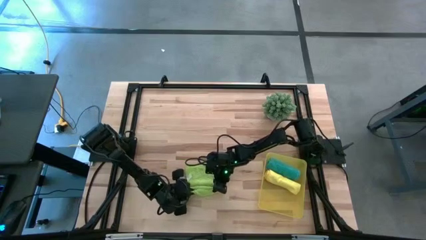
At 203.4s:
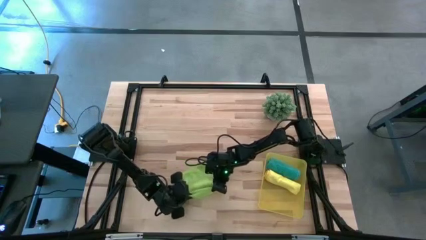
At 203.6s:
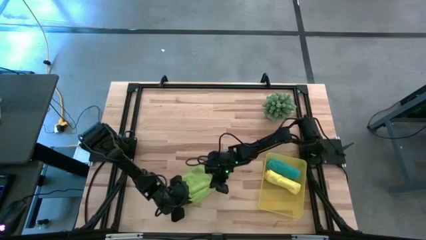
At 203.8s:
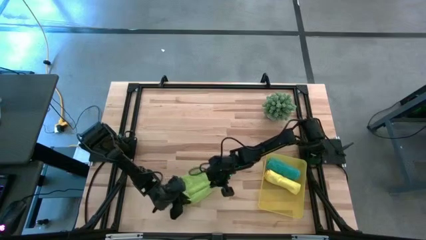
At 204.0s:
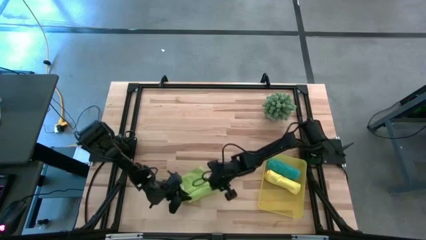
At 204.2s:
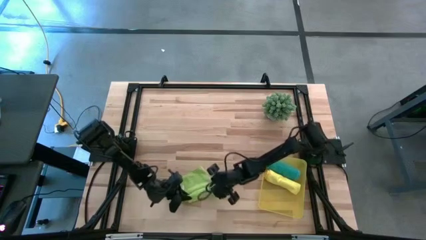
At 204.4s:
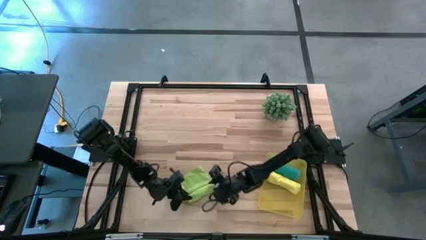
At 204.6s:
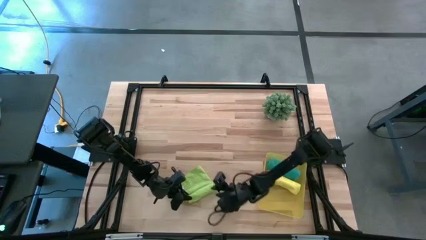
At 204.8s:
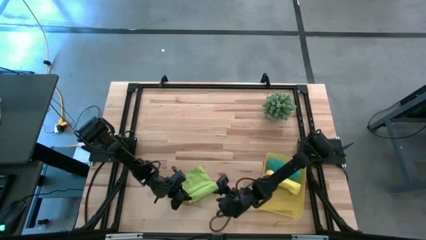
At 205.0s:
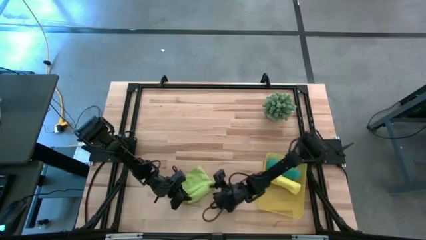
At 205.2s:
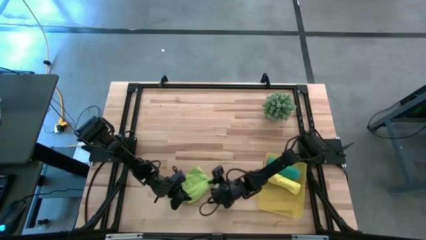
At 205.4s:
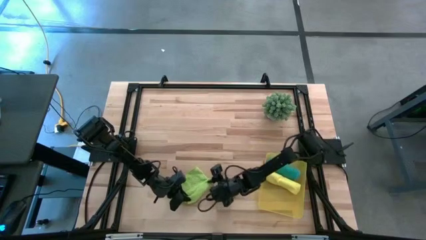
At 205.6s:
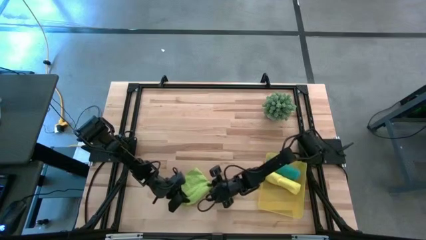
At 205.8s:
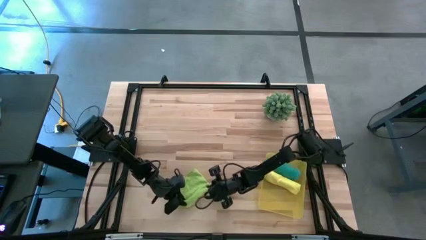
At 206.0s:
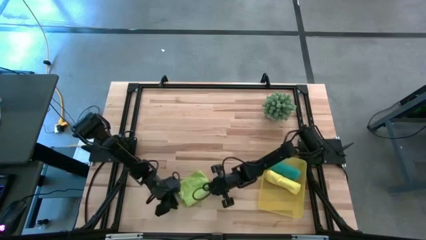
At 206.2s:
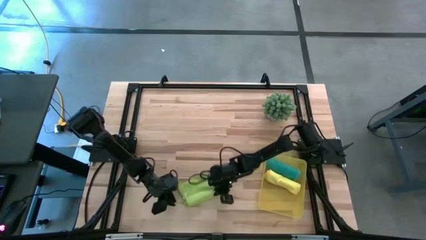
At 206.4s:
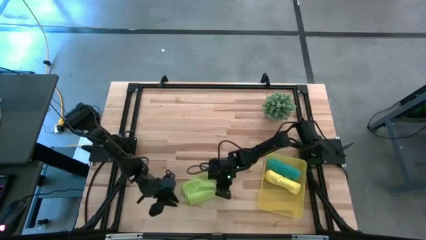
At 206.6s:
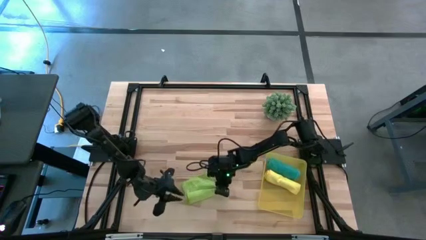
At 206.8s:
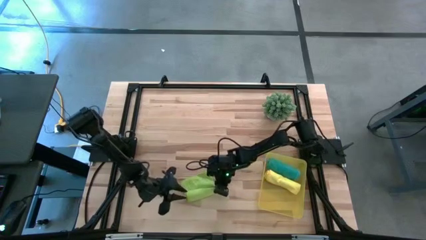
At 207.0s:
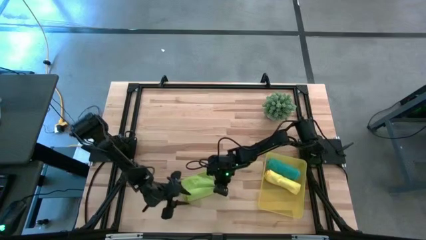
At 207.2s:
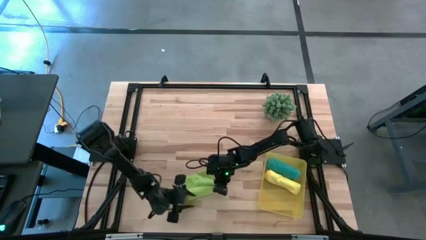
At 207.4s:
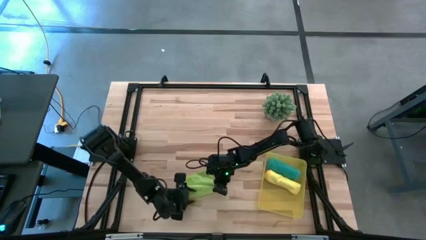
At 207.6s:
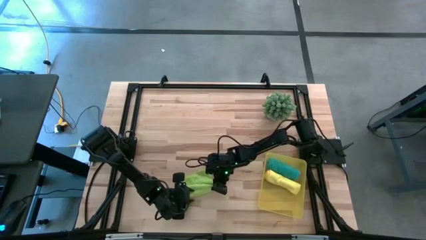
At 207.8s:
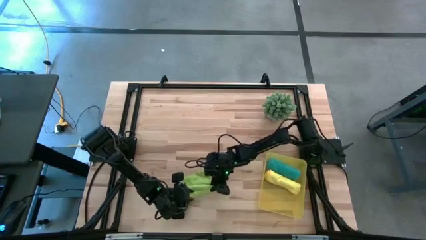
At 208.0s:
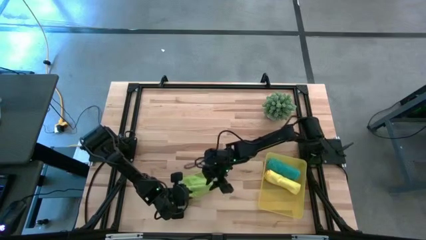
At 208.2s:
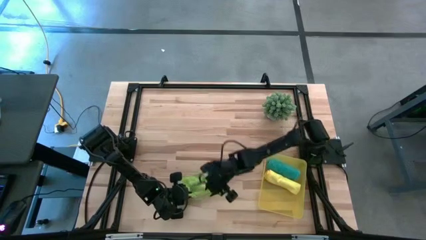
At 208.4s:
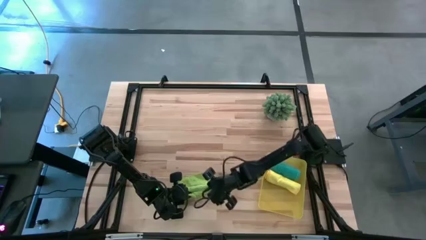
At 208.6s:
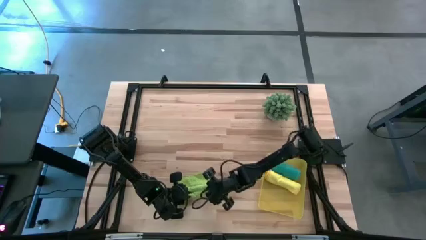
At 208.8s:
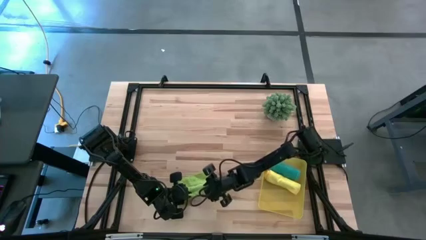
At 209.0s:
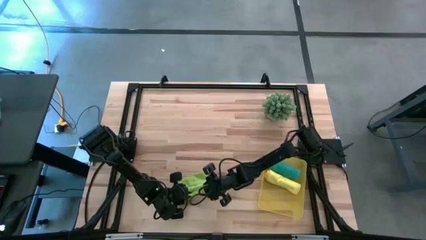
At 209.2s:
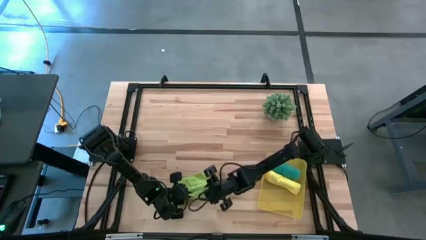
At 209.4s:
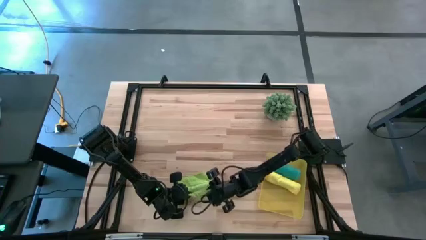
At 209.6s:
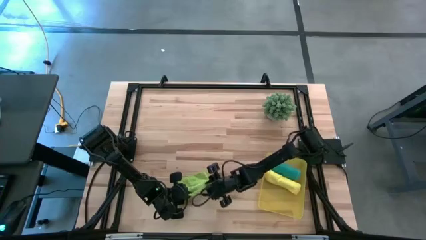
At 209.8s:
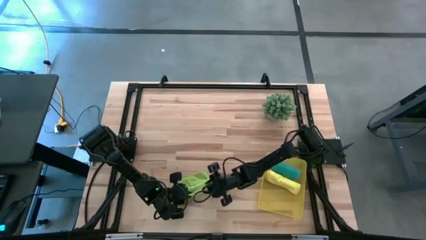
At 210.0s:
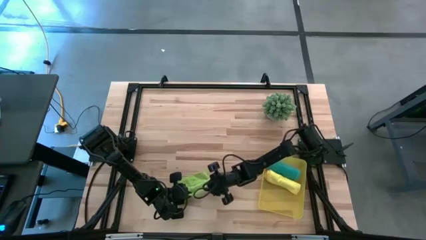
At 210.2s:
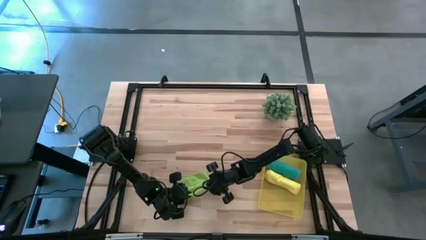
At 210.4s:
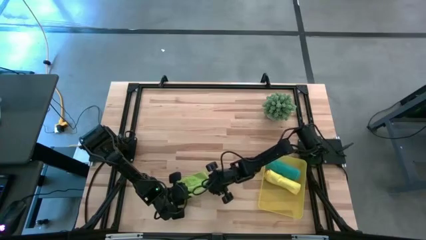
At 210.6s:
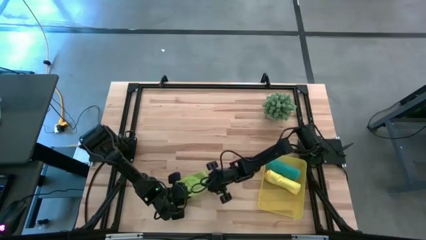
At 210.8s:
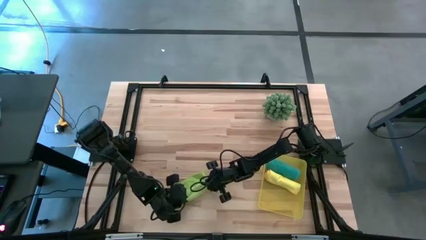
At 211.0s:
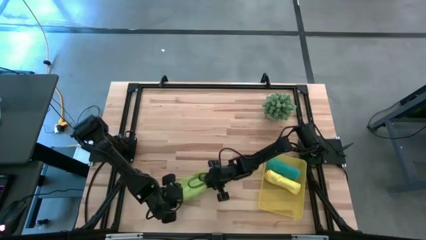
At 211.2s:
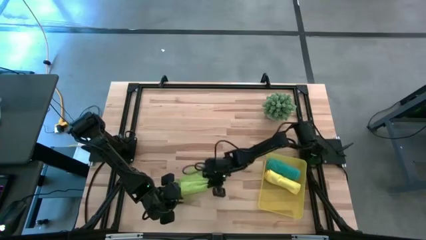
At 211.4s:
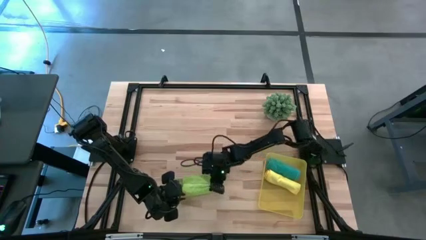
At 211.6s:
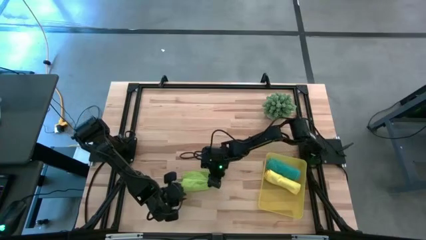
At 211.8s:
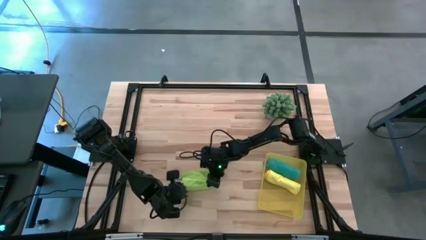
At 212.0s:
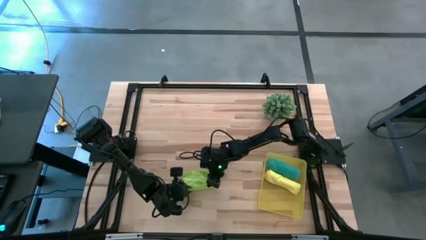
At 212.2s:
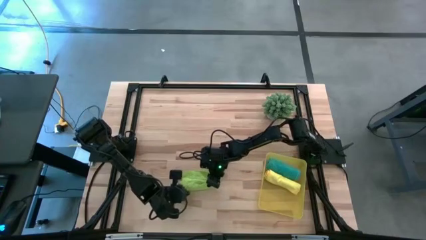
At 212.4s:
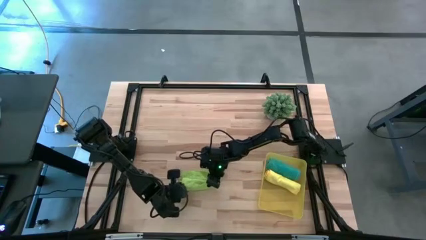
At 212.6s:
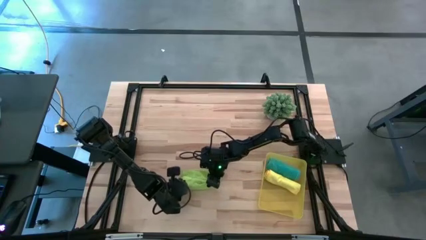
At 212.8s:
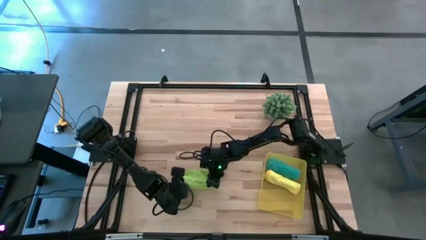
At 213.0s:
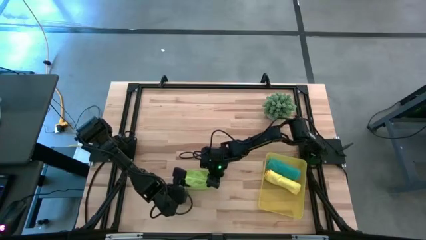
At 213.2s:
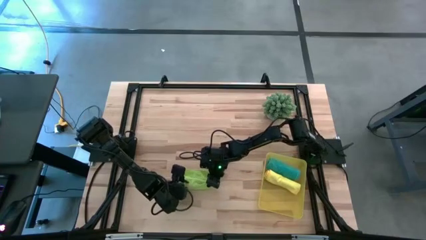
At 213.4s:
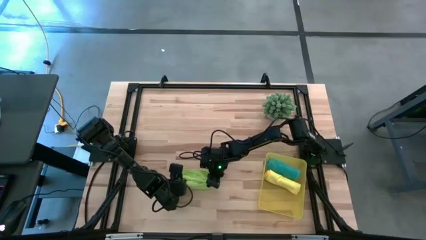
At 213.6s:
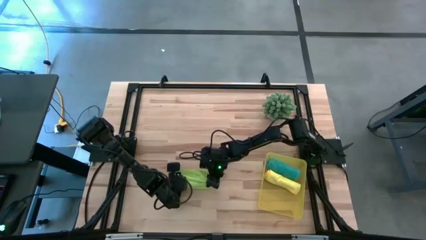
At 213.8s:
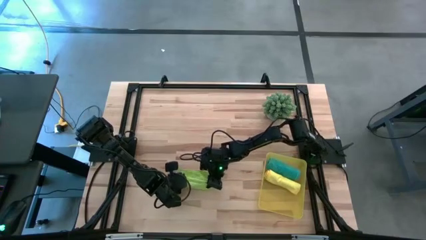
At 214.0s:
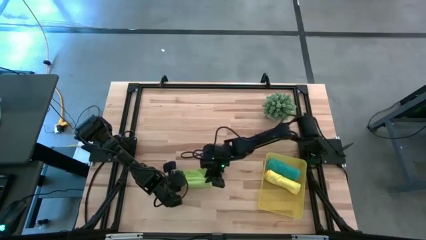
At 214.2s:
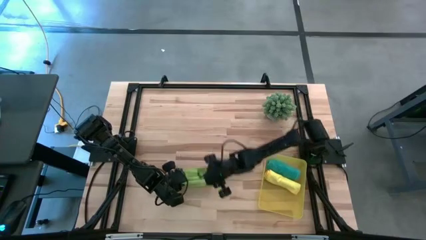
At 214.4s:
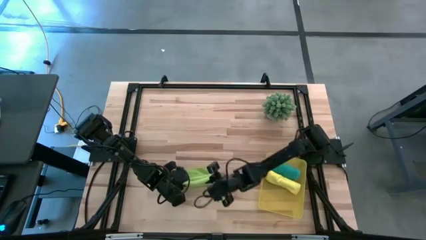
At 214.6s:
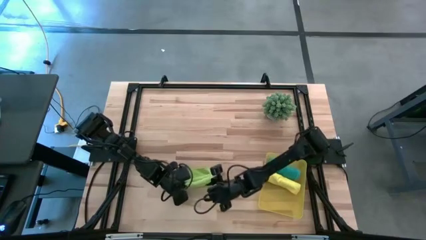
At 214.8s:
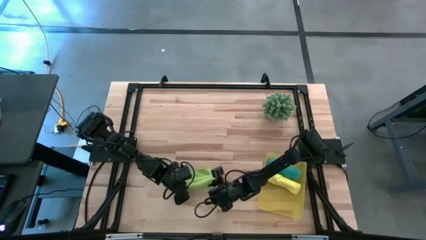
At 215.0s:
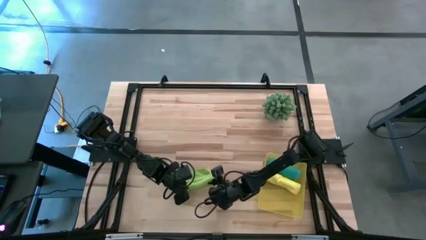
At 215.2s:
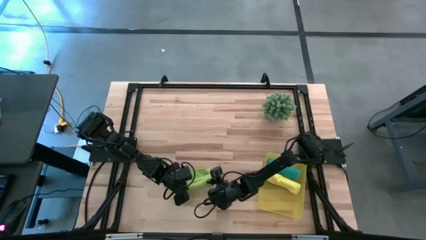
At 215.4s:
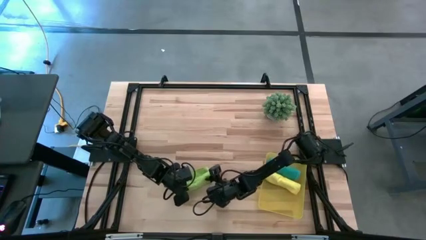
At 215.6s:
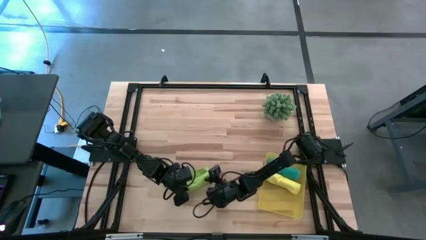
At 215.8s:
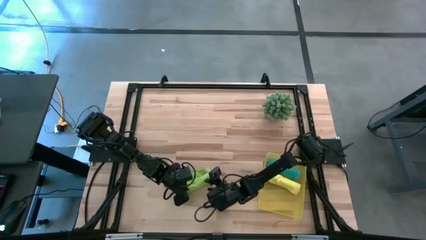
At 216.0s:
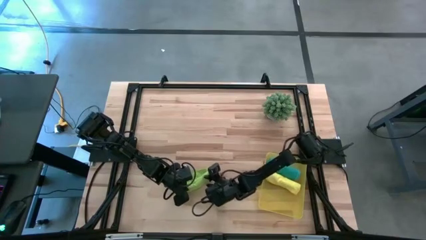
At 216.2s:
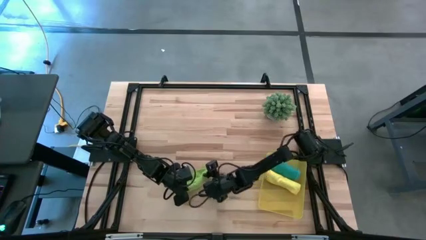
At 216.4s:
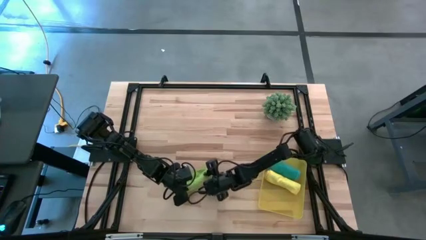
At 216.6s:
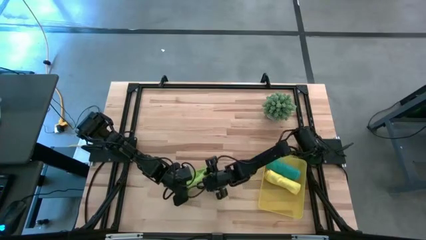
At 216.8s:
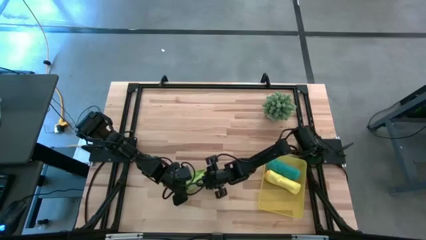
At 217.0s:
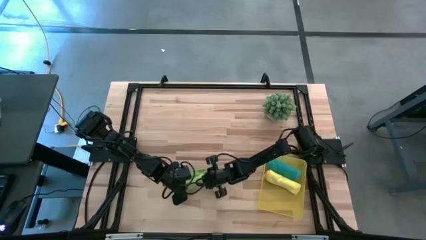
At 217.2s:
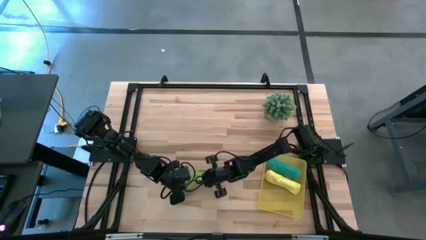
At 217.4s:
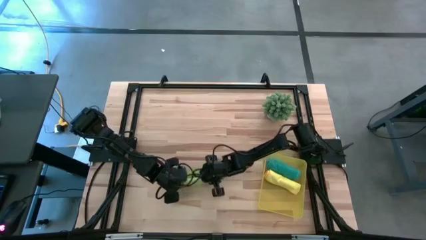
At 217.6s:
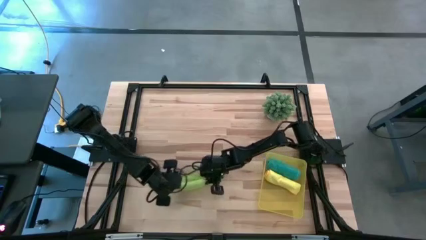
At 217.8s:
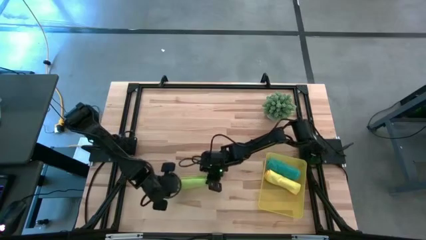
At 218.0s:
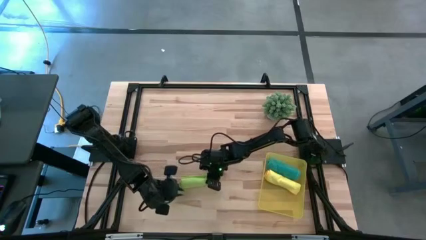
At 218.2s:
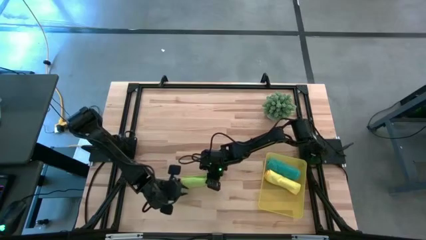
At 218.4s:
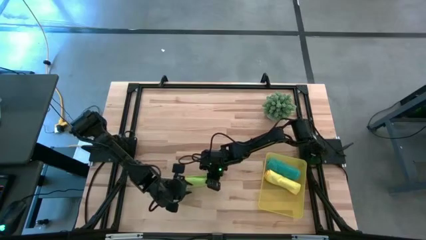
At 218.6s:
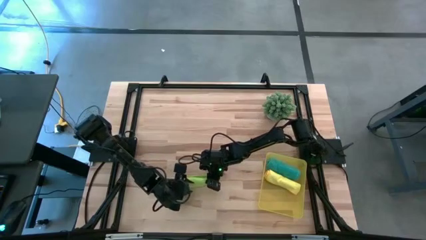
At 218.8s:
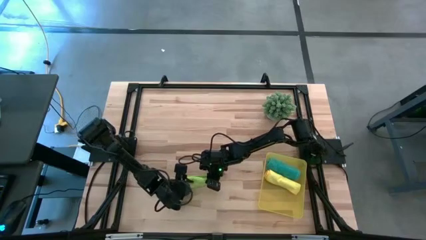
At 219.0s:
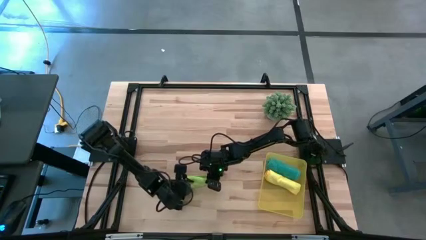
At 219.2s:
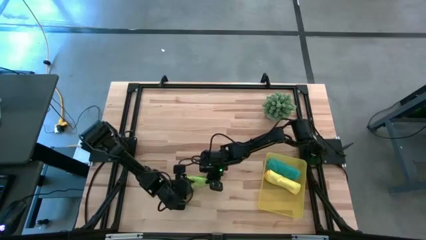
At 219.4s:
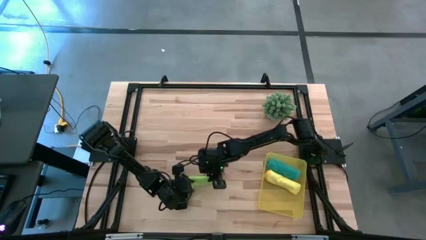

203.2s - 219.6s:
Task: Roll microfiber towels into tight, uniform cylinder then place into a basket
Roll the green microfiber cloth
